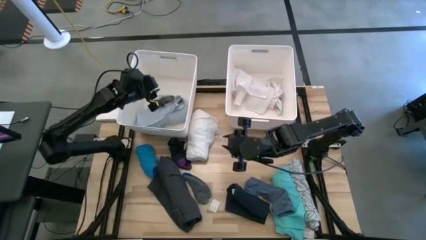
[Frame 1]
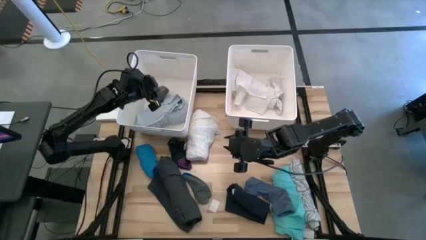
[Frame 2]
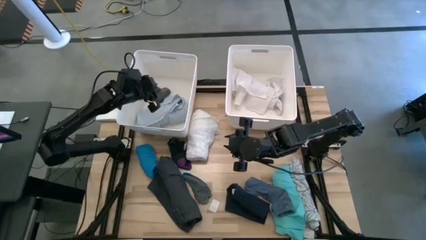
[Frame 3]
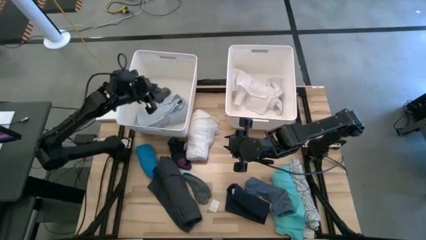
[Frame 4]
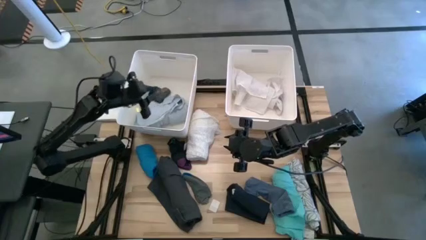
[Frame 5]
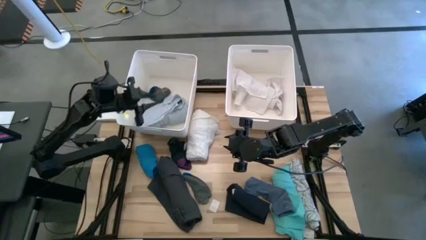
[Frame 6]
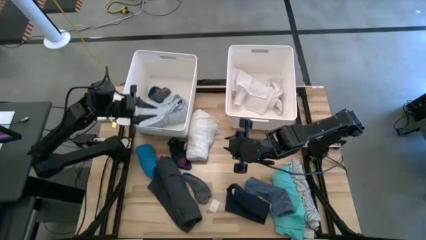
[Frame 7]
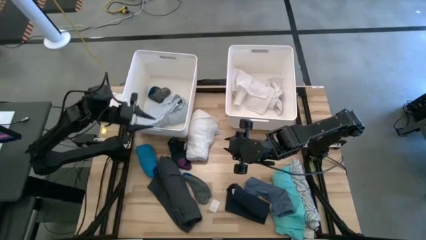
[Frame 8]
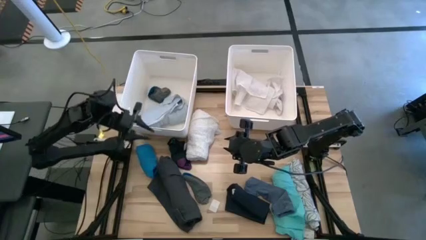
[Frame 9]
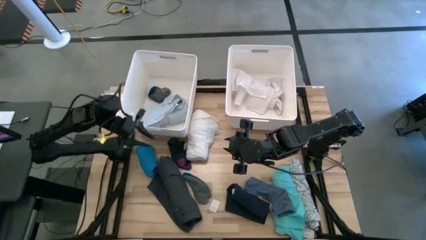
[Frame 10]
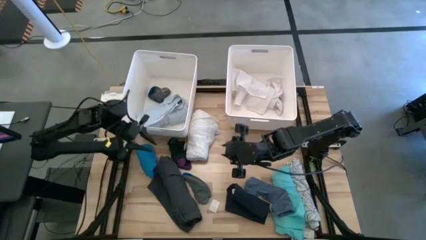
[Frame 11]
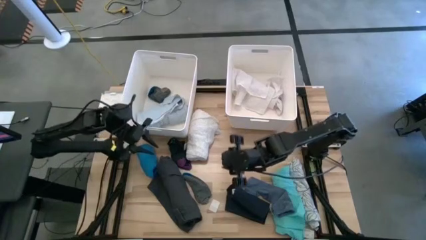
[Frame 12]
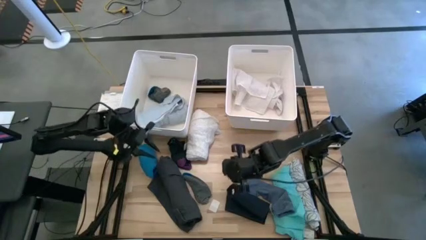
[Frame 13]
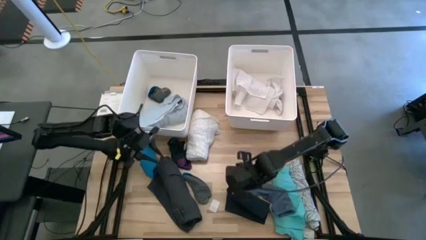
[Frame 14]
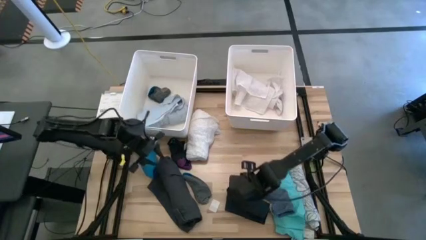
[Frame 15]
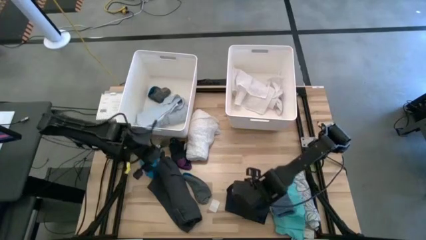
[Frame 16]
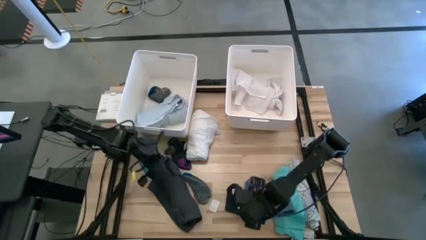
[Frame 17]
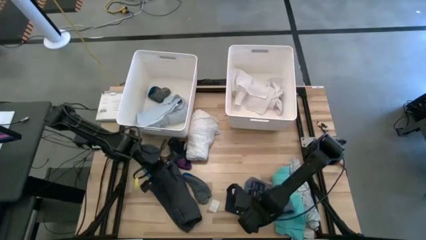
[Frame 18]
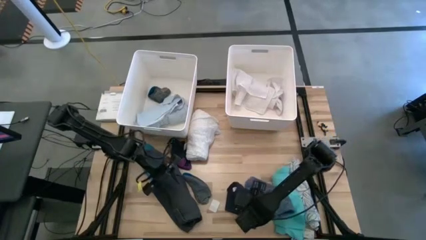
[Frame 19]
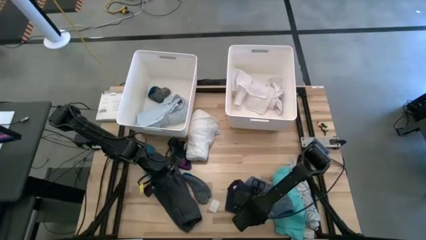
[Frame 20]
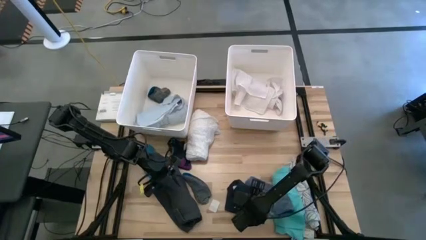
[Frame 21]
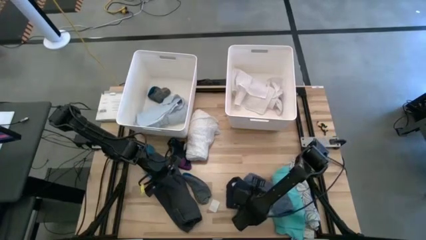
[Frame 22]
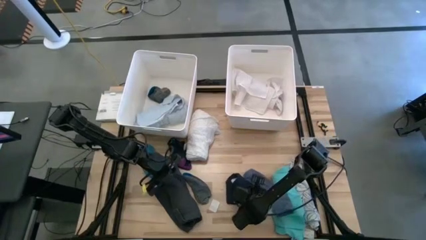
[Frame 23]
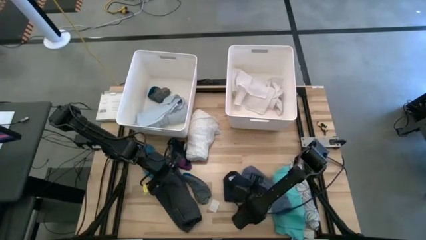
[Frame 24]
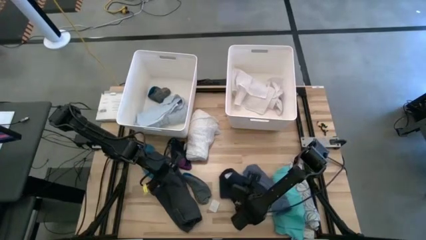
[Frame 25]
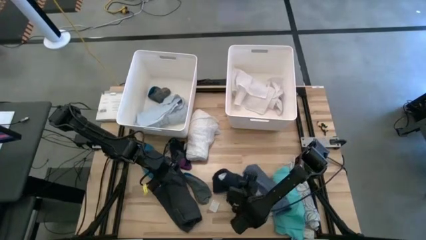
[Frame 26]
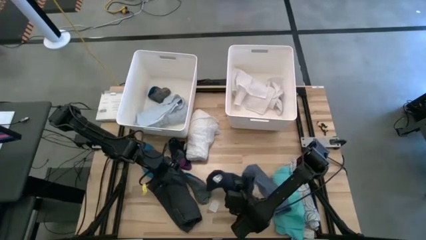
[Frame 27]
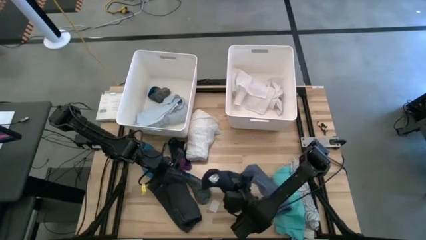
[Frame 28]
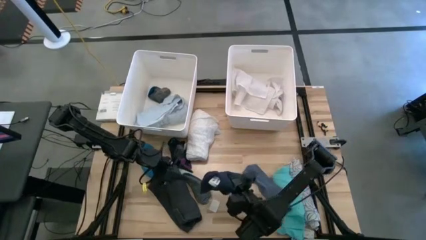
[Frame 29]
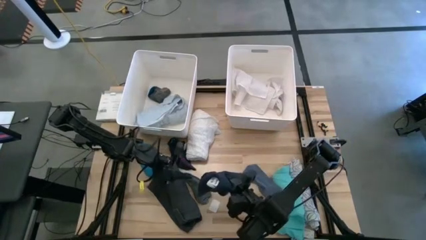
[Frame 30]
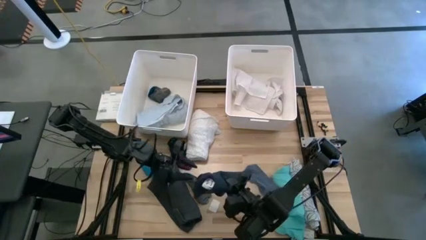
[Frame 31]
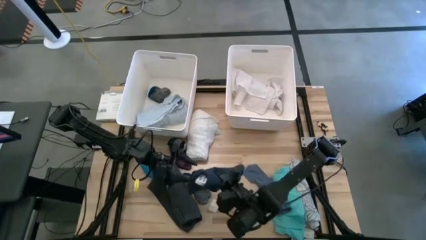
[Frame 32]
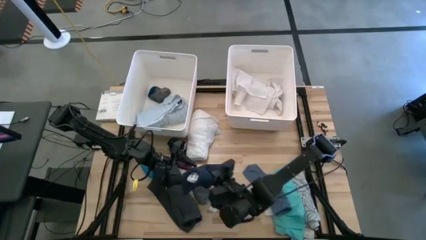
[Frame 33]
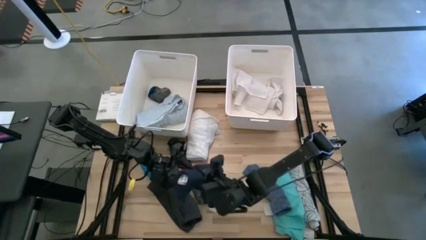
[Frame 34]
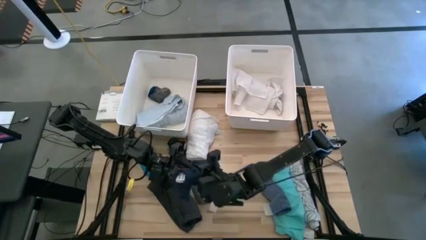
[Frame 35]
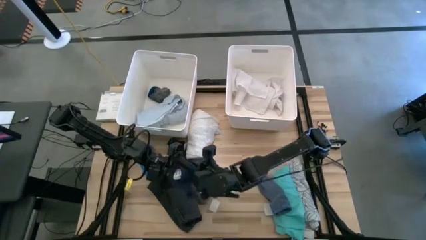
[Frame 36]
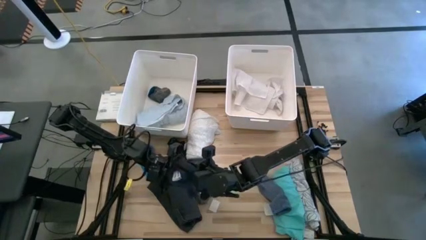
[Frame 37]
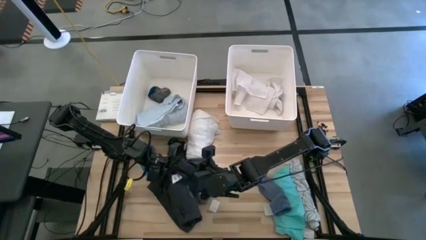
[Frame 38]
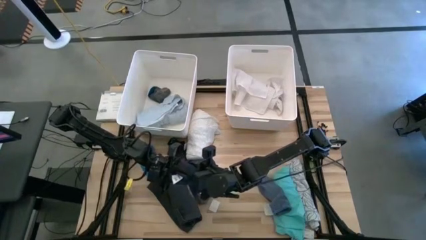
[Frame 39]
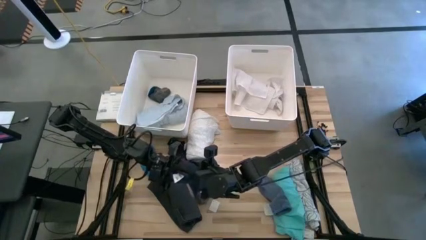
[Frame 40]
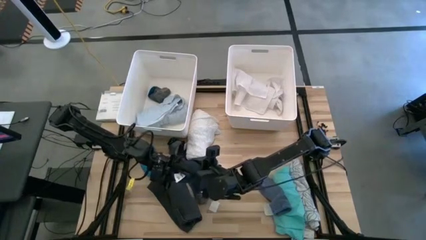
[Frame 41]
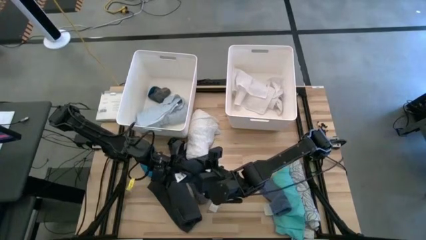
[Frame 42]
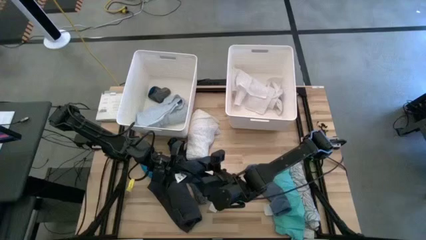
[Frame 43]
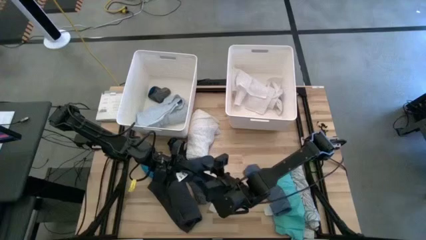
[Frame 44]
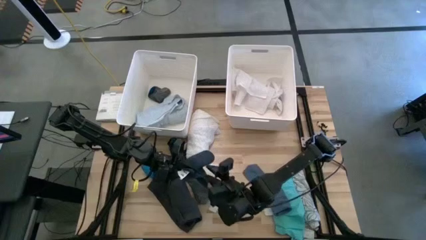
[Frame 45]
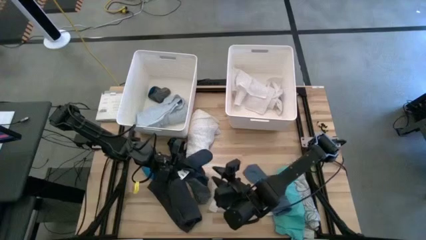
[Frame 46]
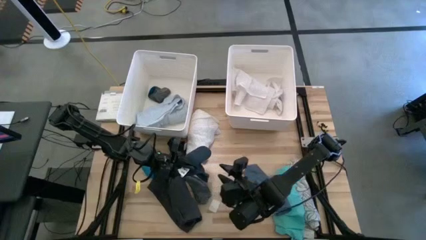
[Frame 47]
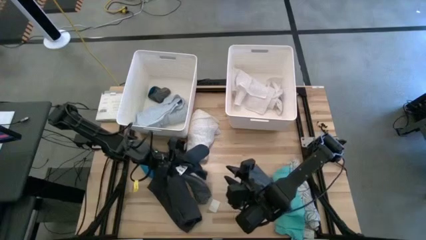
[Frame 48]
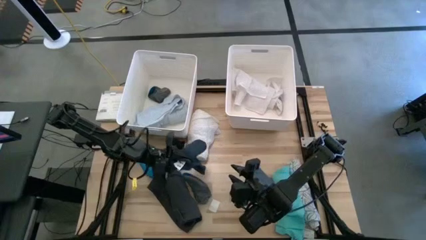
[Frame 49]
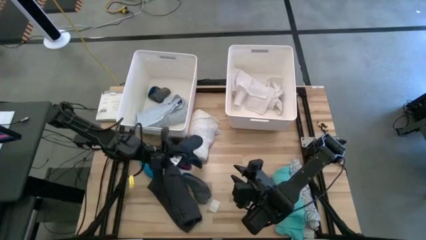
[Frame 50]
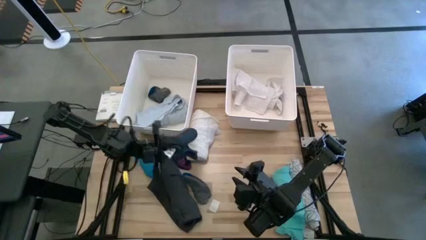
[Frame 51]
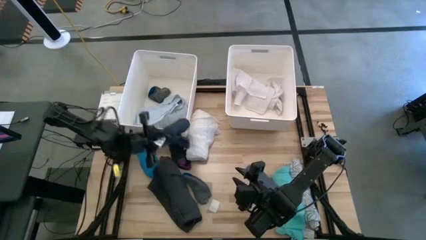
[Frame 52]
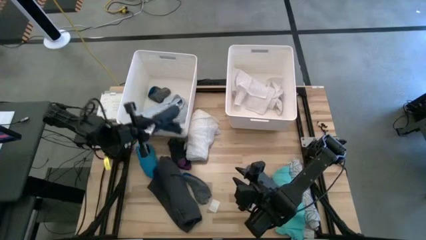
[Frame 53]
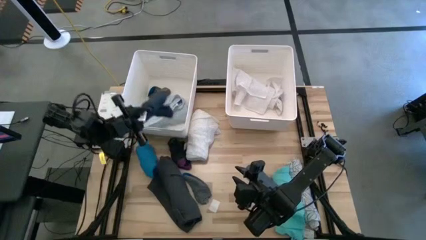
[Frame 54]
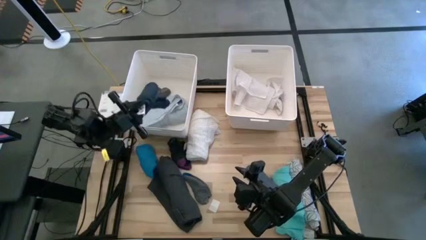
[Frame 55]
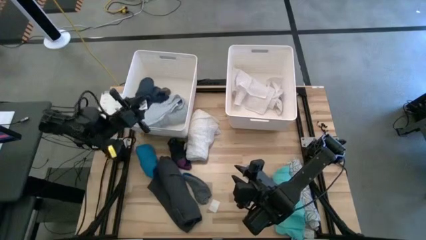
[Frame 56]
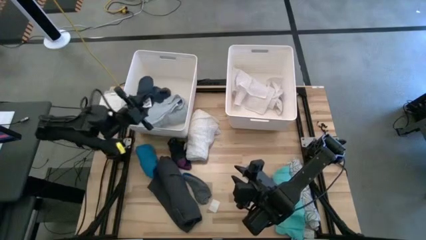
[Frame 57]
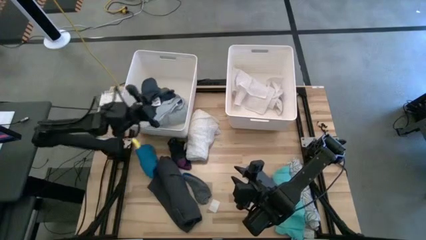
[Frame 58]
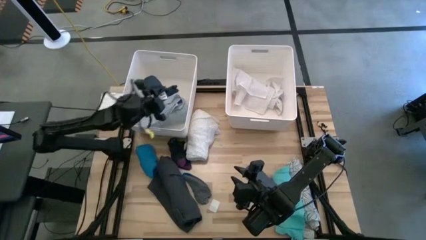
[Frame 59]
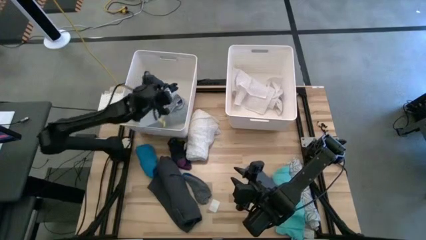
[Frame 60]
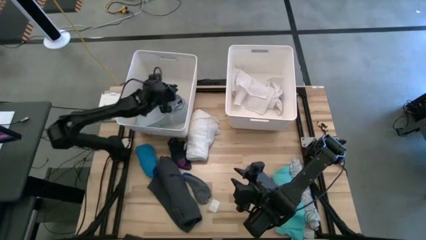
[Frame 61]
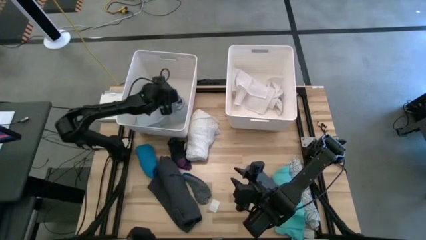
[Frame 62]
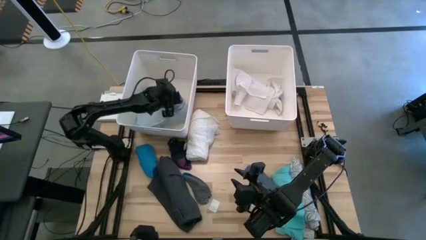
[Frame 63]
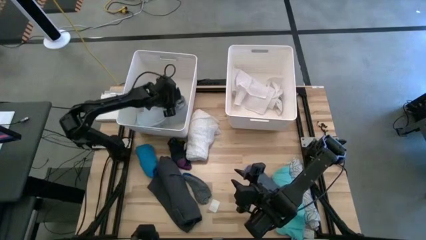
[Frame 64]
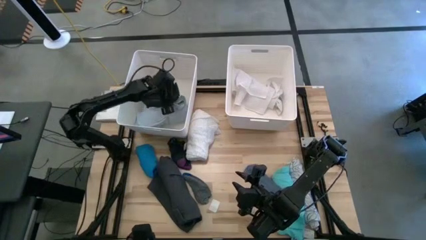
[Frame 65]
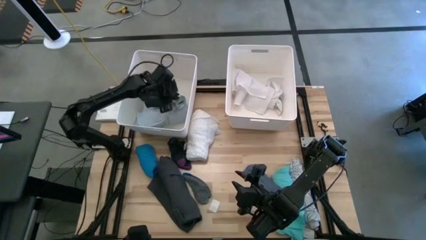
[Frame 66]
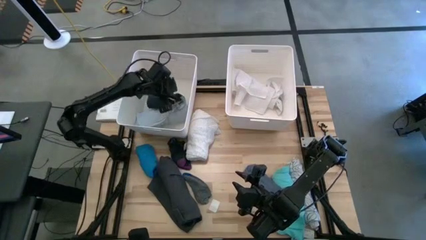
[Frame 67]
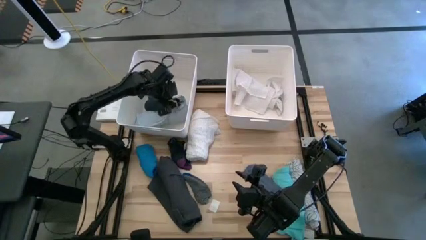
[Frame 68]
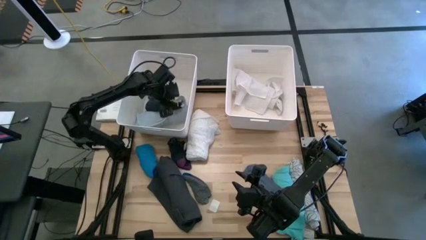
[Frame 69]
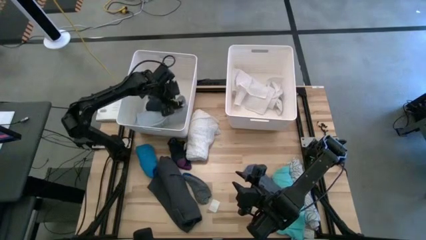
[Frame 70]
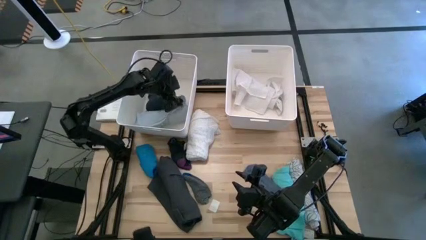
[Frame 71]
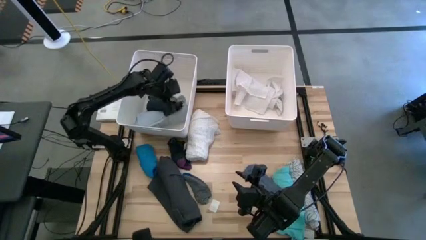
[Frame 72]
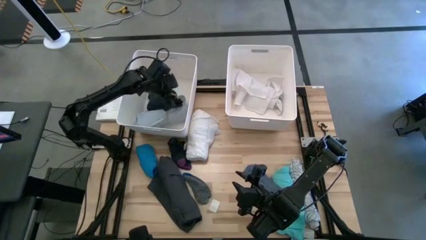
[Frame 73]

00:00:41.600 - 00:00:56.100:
Task: Sort clothes
Put the rolled dark blue pants into the left white bin
